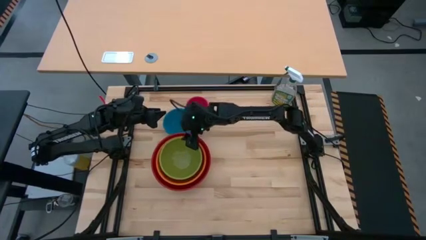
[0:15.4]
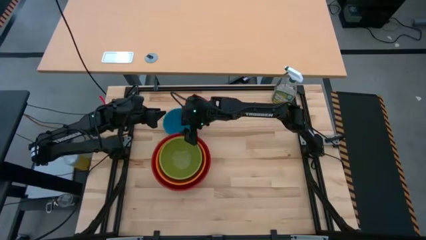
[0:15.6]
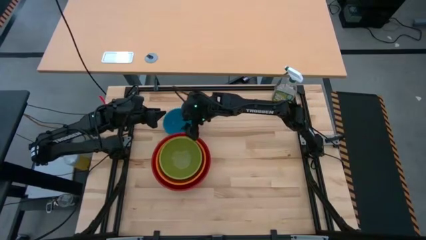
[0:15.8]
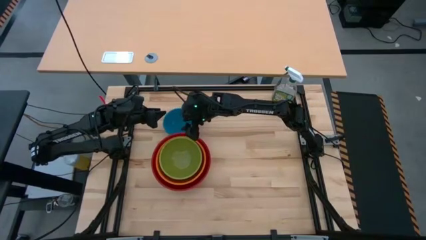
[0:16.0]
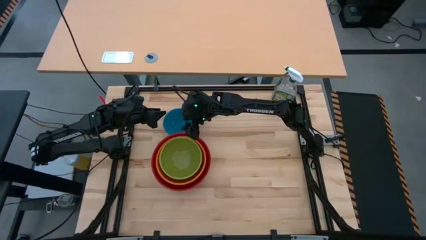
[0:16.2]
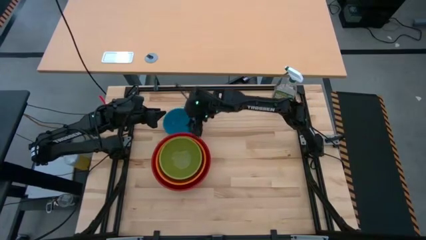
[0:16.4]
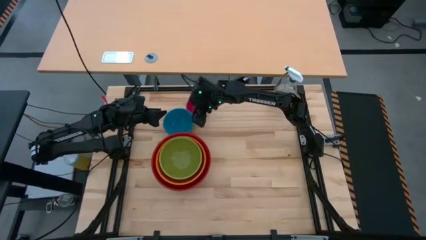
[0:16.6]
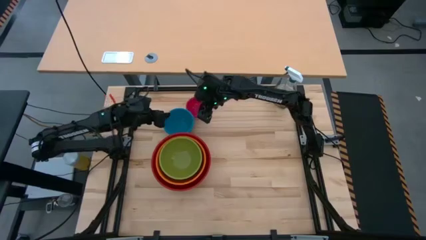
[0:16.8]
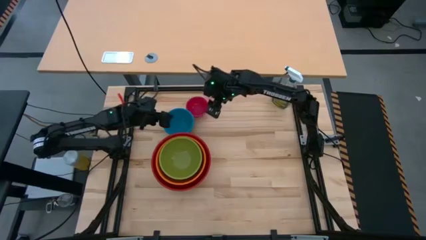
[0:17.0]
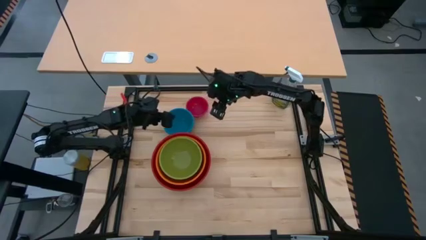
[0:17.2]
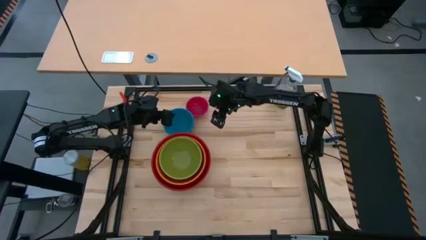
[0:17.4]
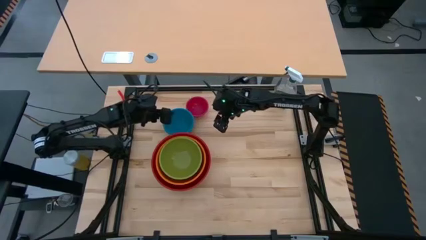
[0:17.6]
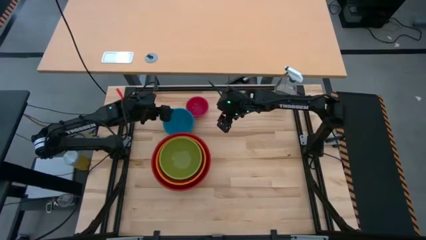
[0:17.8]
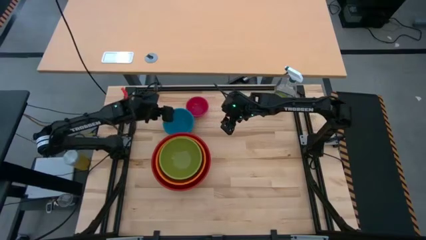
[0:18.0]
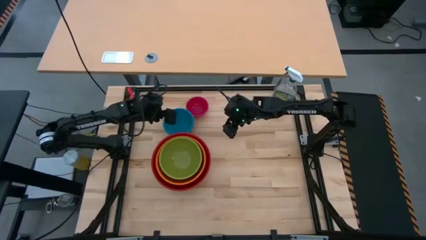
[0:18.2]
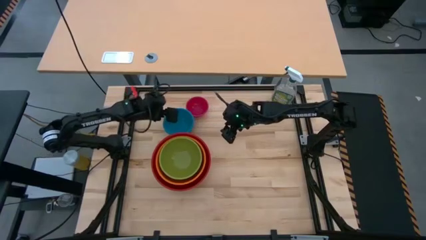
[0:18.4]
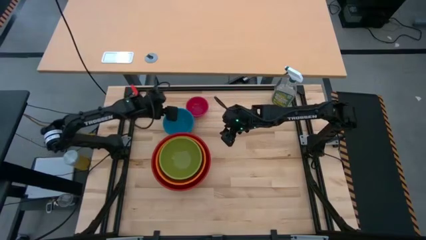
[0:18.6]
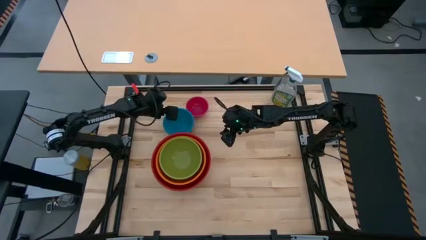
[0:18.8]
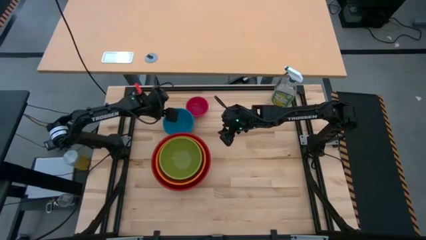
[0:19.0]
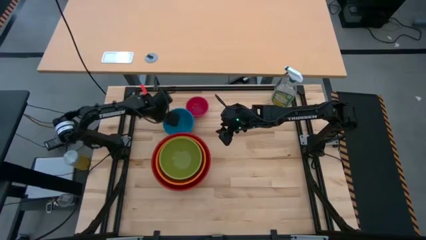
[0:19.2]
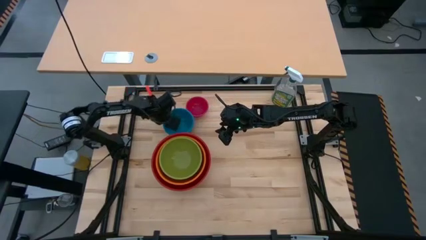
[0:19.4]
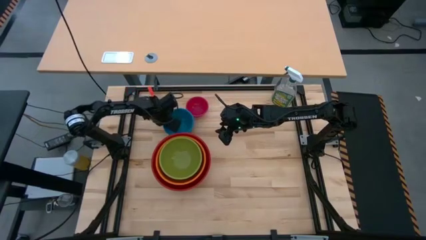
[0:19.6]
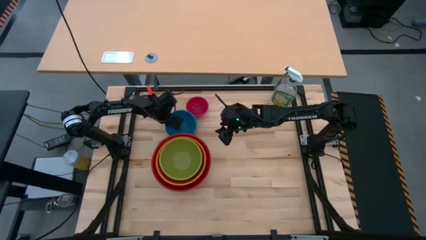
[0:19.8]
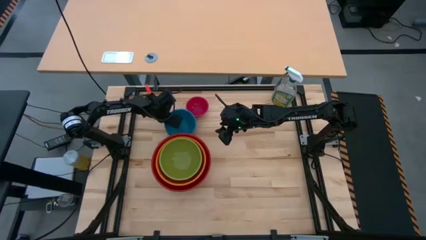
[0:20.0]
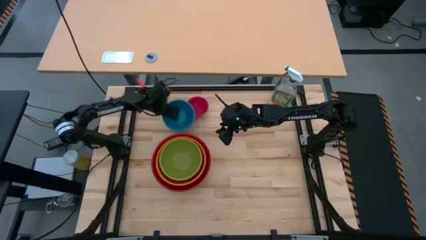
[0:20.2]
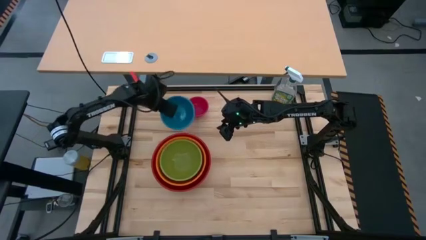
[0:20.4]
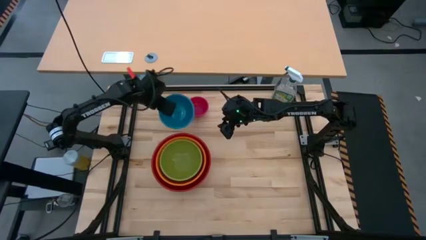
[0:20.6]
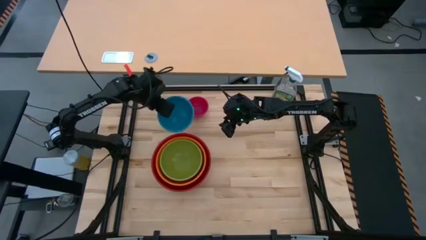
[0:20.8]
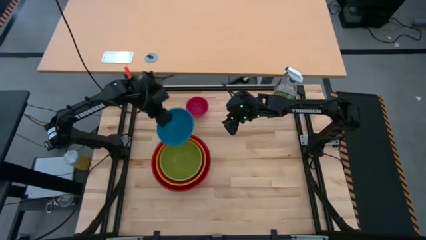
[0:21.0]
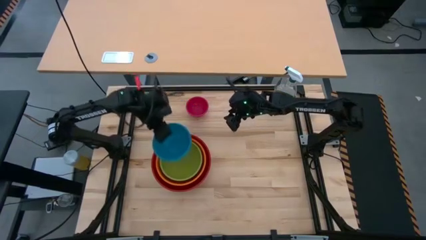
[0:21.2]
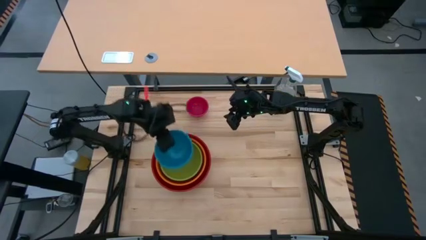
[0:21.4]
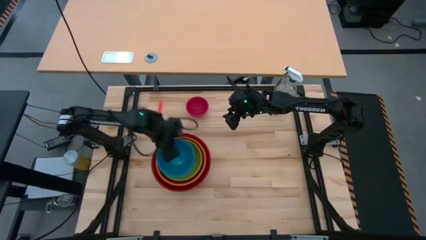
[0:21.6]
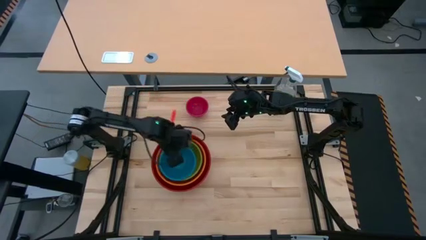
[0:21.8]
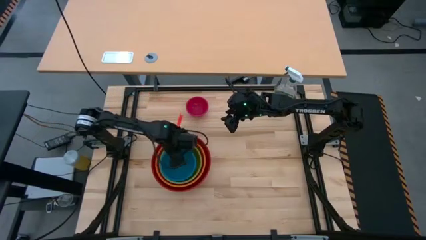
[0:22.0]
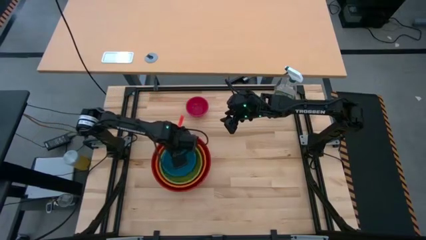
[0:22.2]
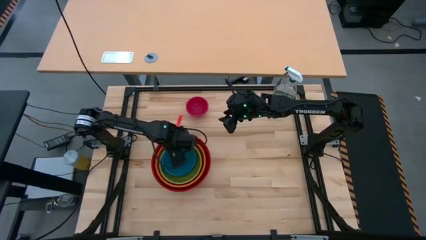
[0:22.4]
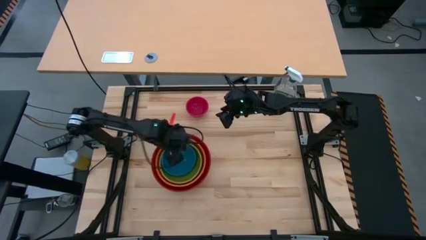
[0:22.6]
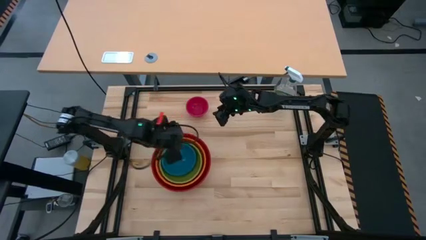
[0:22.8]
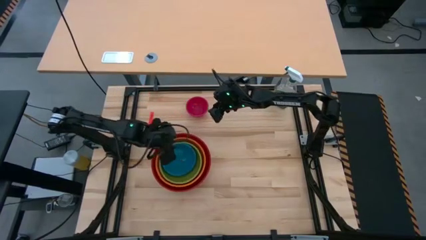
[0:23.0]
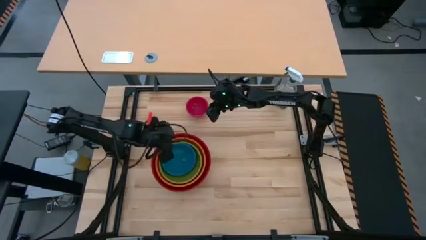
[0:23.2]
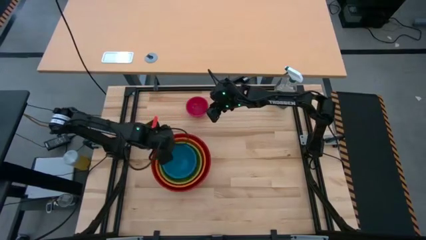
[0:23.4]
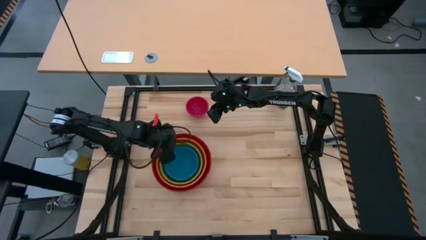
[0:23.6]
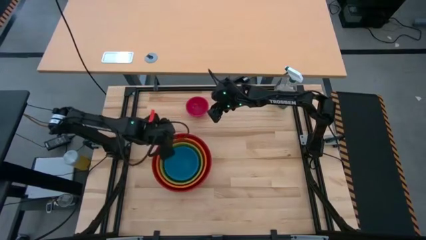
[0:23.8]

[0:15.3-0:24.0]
Stack the blue bowl on top of the green bowl

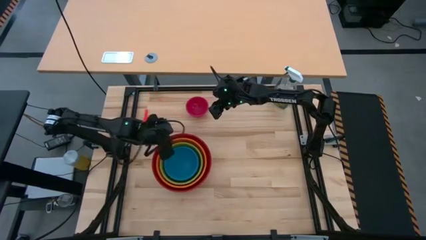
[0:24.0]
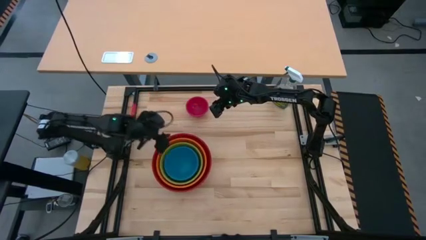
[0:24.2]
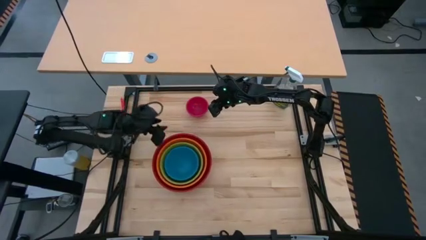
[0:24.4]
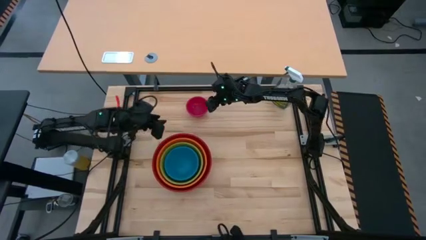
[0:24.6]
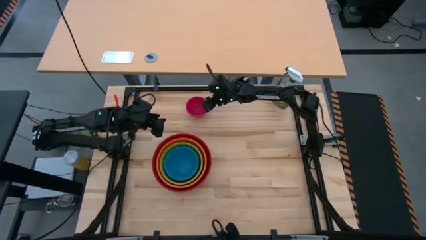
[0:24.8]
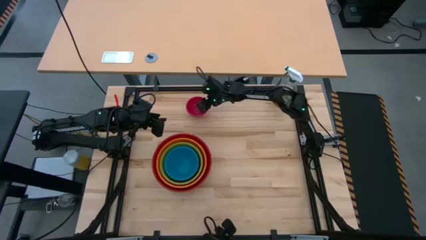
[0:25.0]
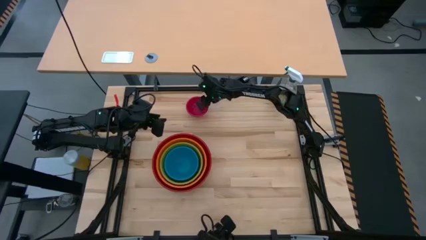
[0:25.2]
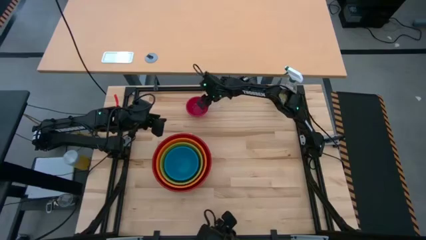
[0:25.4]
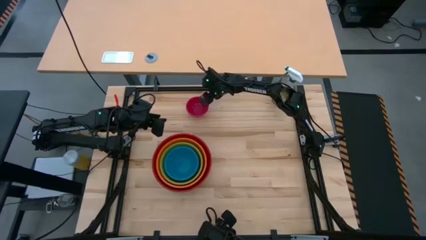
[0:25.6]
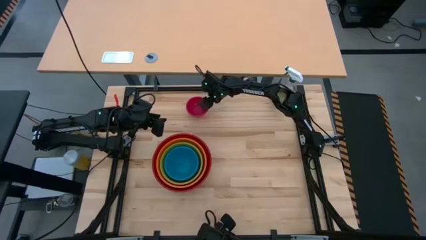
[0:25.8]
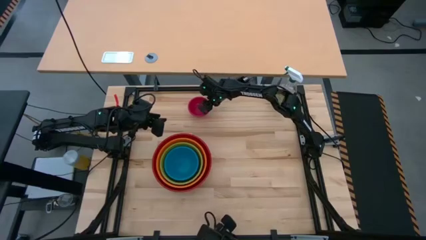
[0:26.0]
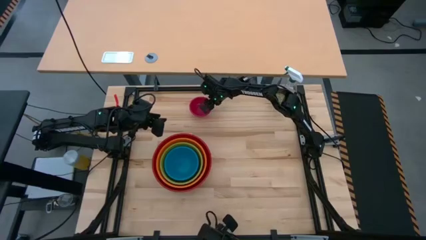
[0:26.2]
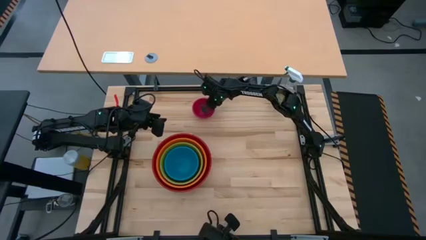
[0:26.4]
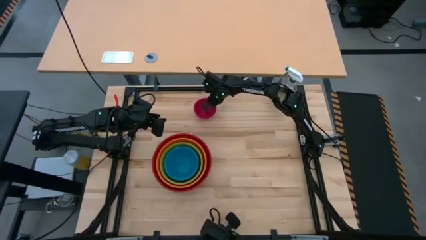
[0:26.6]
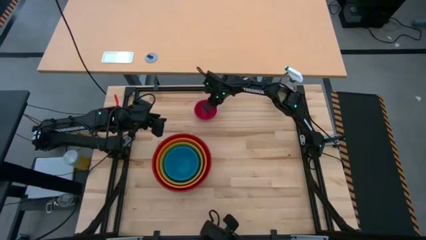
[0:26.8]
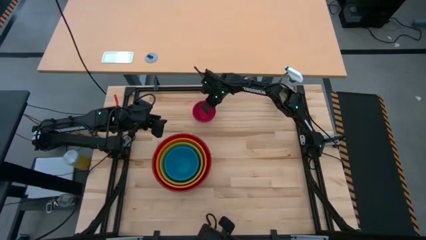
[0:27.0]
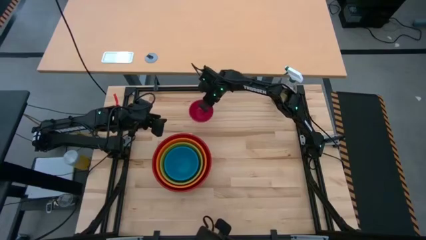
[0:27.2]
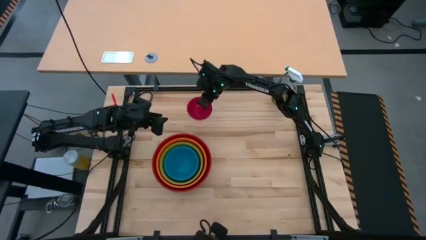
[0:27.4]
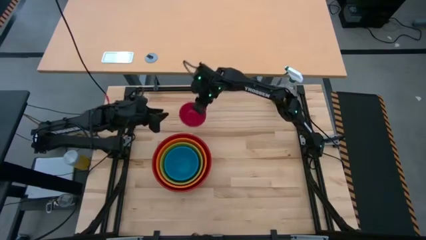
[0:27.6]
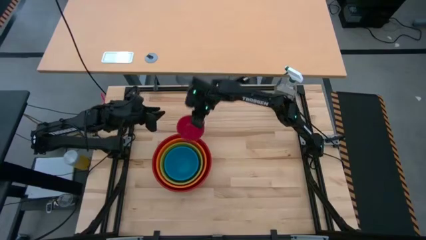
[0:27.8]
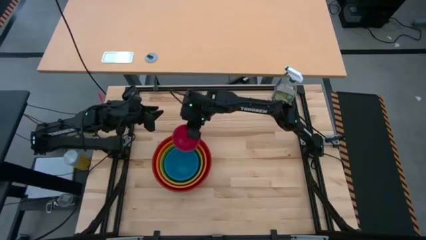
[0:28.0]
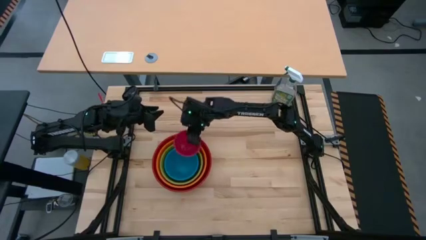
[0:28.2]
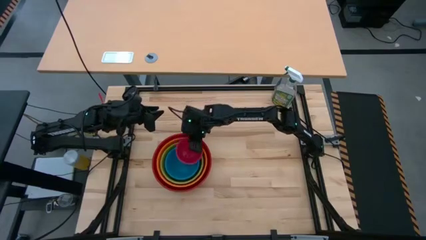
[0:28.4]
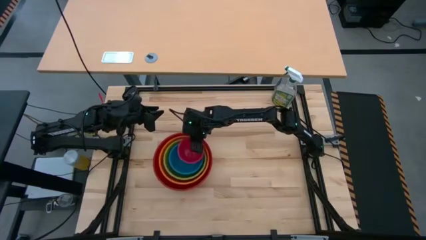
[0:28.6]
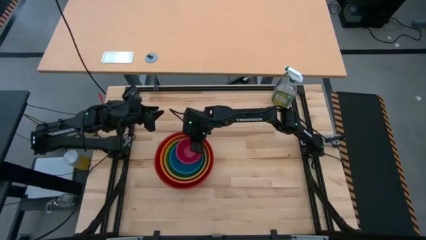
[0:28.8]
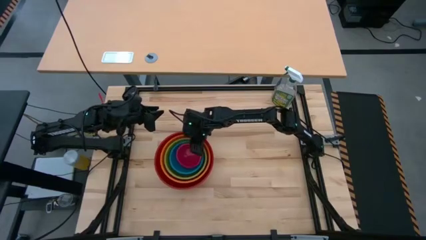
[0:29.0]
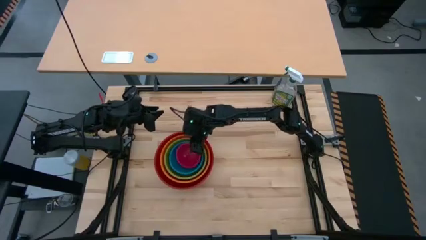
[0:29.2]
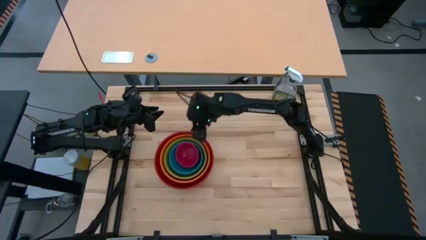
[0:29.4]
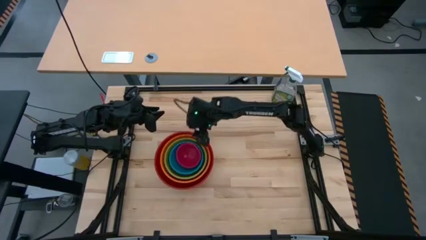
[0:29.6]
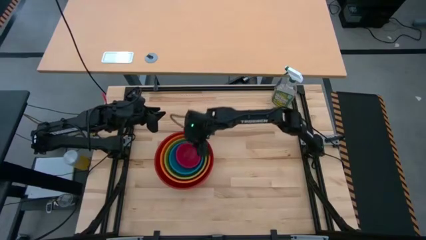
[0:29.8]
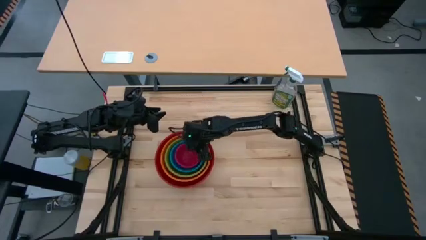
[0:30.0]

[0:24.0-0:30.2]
Stack the pink bowl on top of the blue bowl
